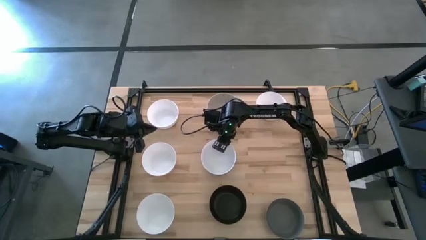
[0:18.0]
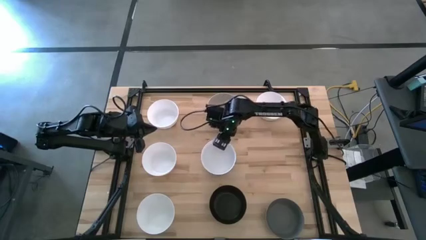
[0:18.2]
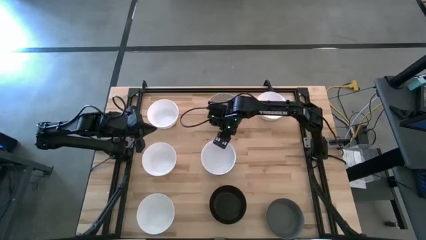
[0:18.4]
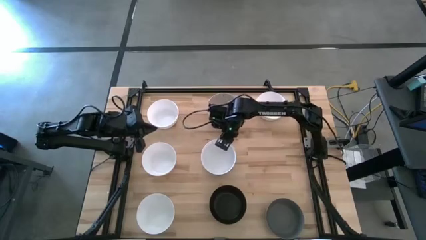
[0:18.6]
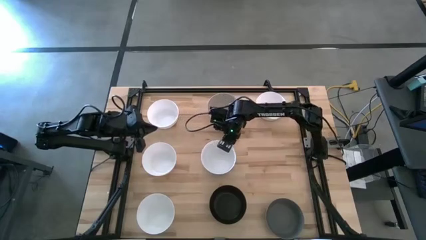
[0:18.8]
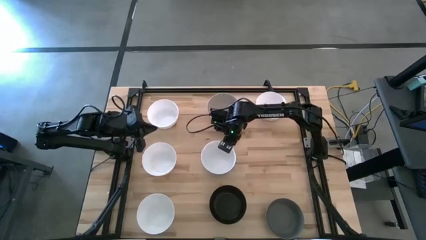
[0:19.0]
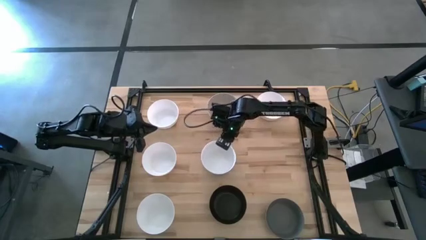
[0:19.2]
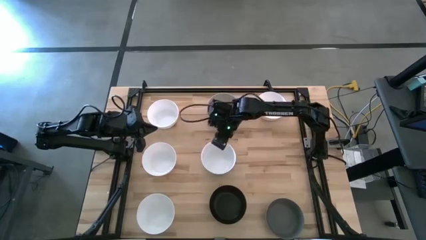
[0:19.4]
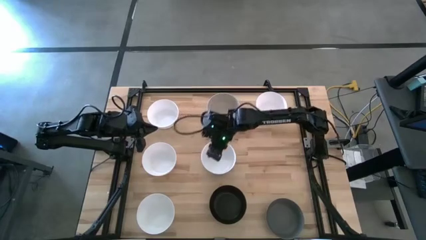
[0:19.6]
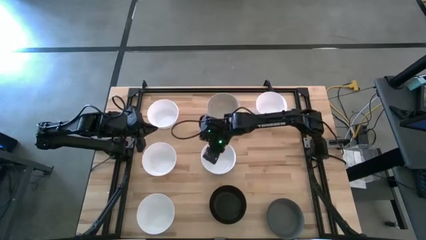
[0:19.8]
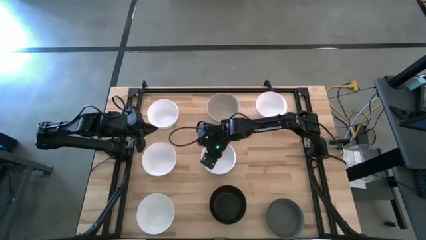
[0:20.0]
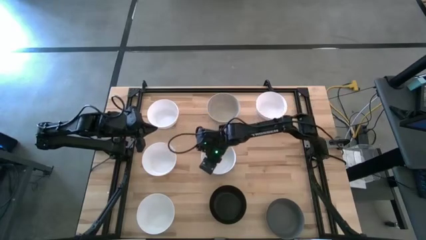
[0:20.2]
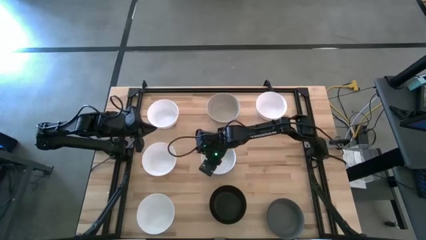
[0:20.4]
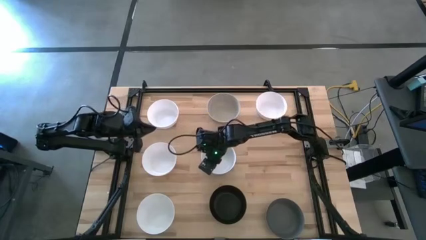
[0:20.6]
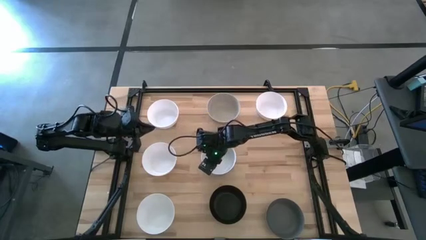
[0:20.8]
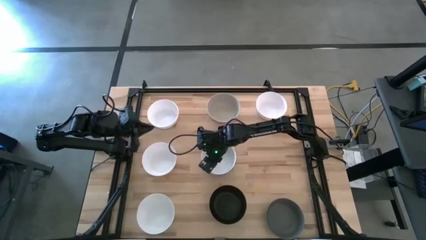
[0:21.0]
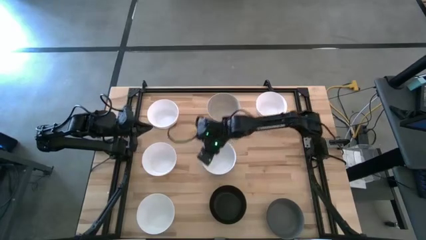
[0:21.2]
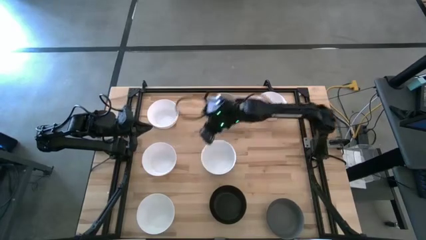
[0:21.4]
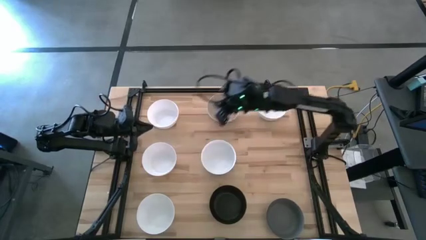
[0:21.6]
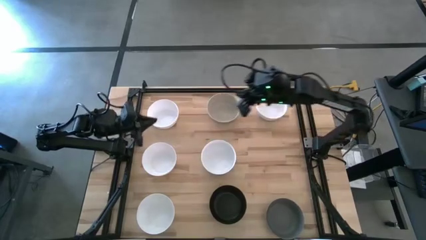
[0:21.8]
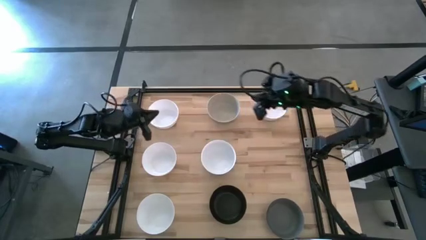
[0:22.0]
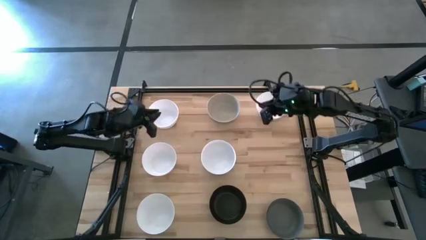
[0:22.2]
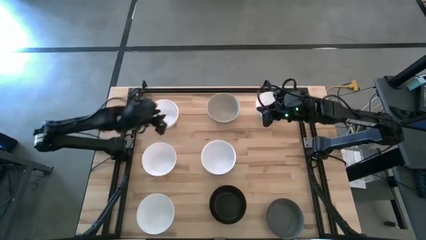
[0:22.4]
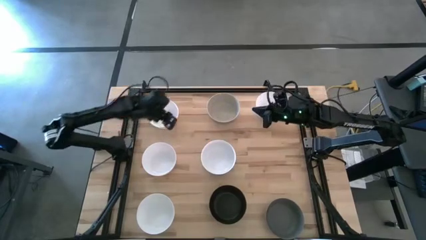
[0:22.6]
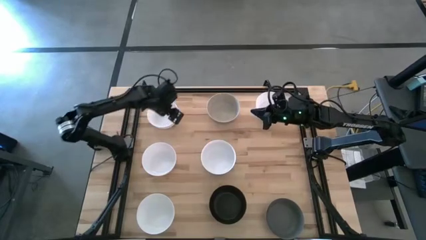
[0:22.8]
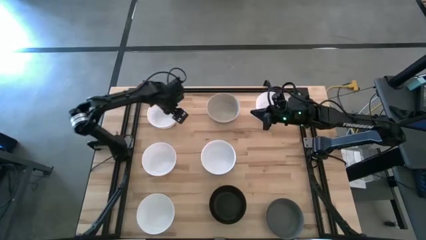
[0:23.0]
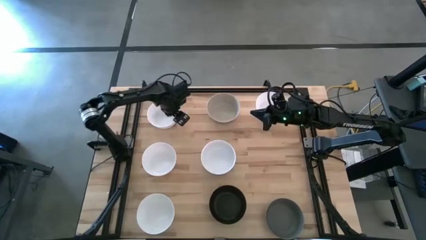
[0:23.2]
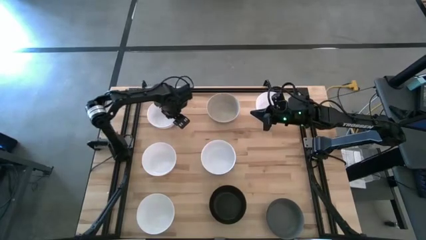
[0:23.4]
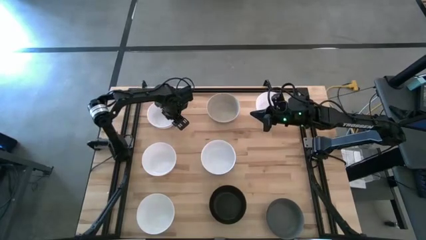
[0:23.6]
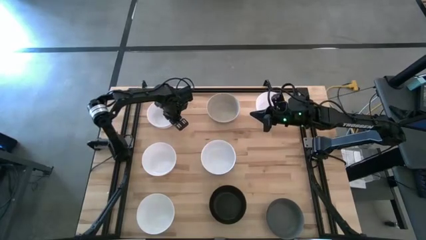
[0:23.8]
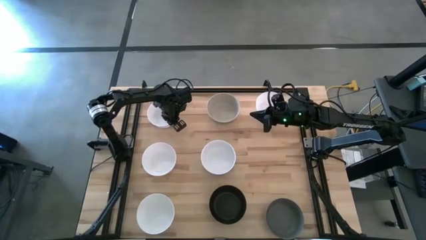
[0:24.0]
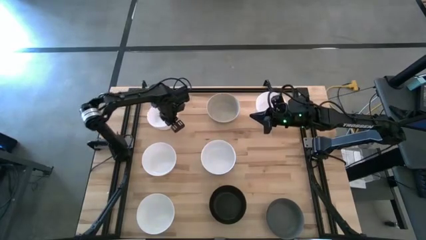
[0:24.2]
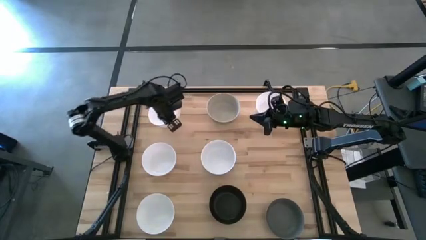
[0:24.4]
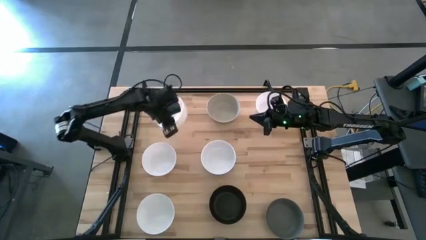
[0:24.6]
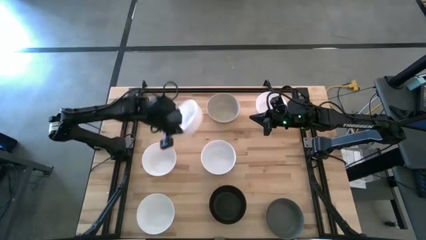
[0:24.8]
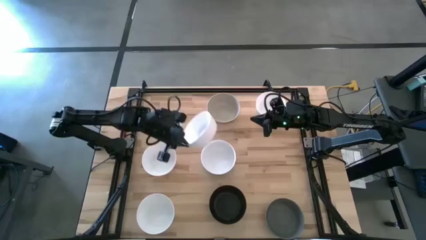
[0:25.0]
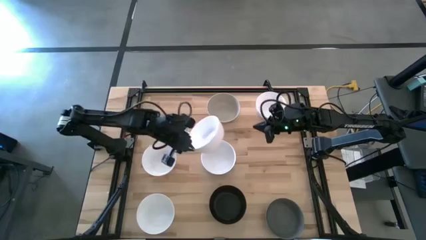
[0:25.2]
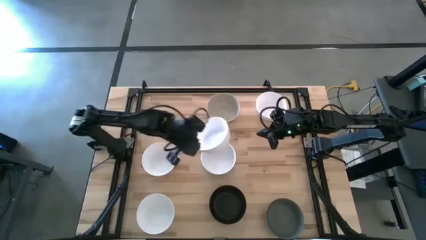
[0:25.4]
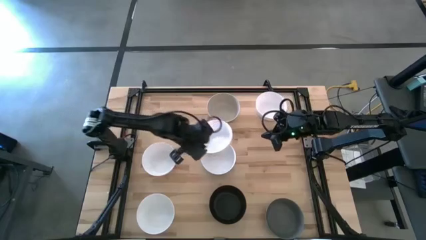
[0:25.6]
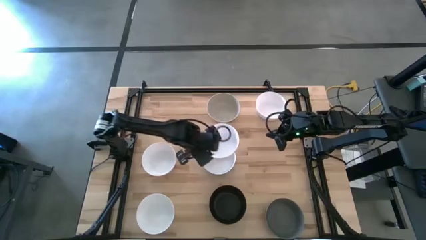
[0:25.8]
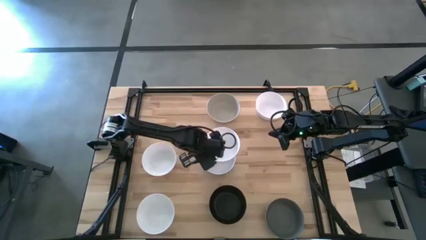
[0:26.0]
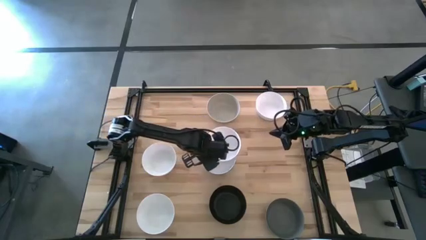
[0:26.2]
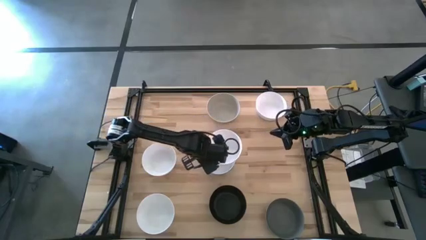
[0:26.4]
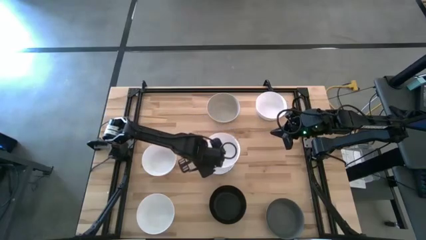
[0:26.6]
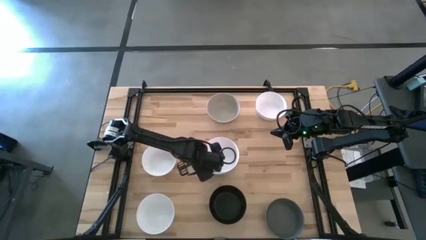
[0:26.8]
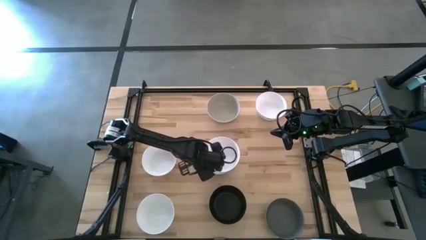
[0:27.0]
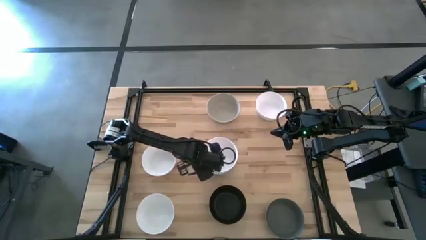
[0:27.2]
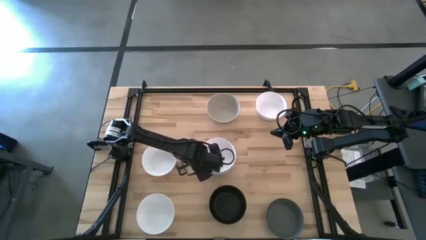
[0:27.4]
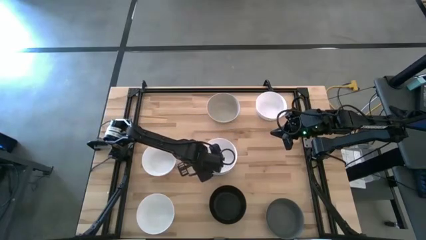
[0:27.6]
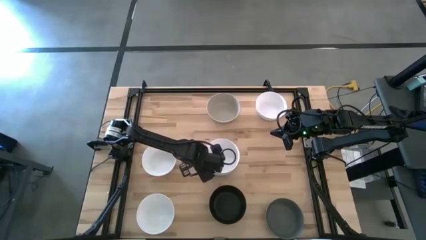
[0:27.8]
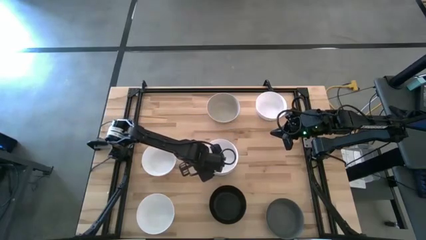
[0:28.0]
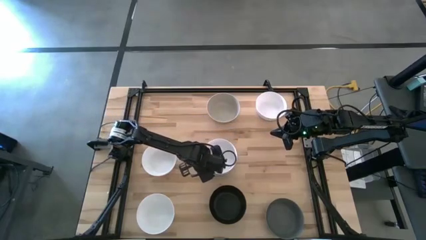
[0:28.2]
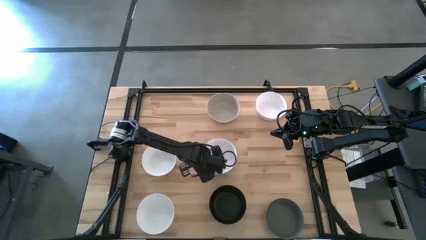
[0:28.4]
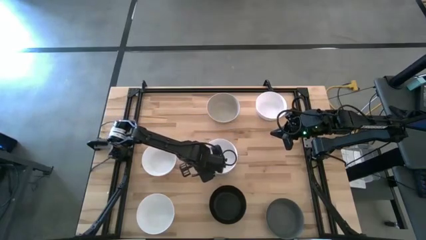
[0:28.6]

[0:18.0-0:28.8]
Task: Nest bowls inside each other
Stack the white bowl on the white bowl

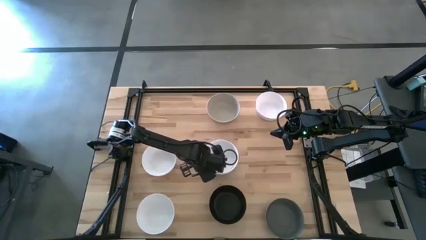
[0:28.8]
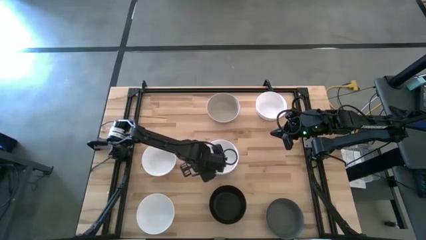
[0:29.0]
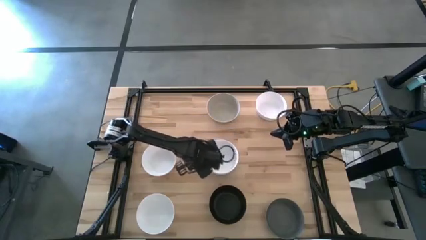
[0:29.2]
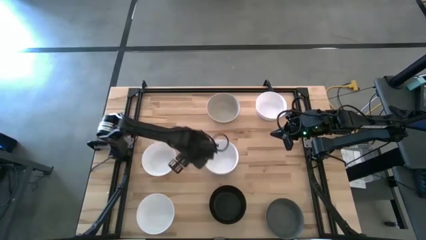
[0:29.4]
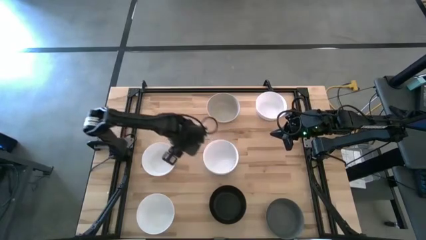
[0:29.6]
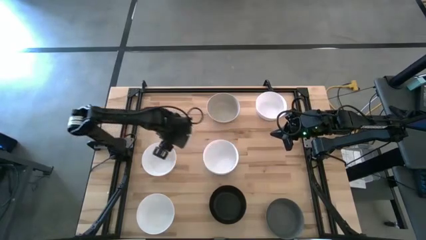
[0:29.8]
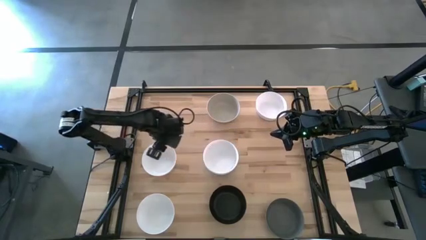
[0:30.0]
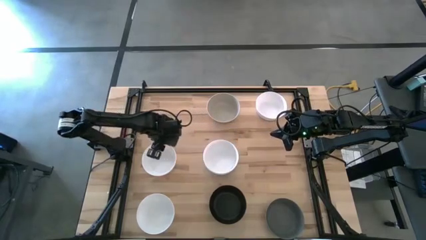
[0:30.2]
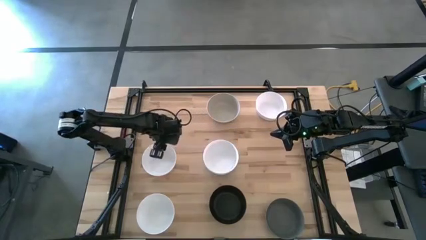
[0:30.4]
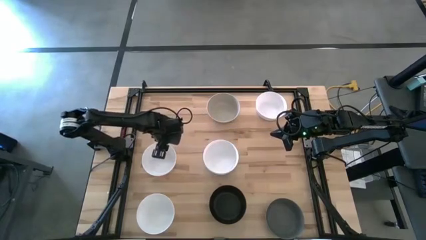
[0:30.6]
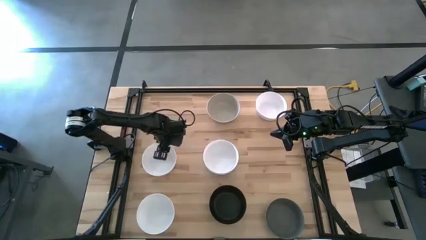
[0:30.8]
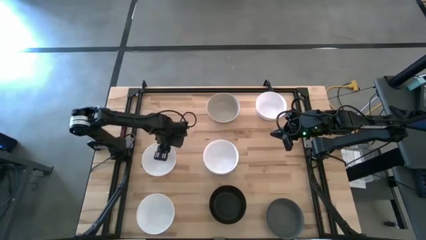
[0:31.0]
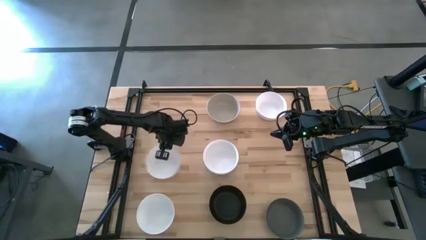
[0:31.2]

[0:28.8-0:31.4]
Stack the white bowl on the white bowl

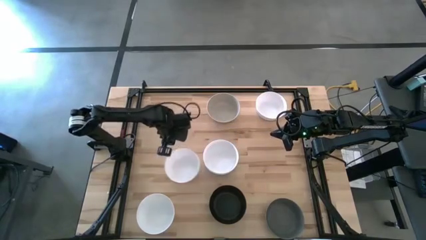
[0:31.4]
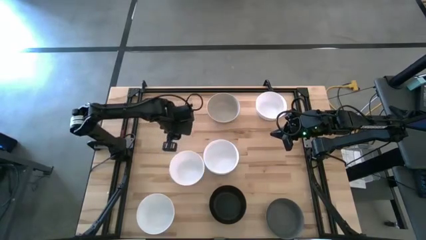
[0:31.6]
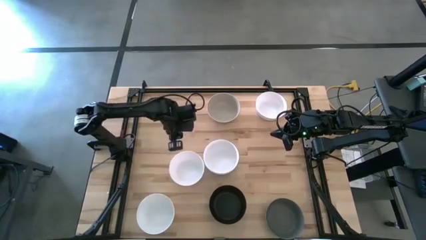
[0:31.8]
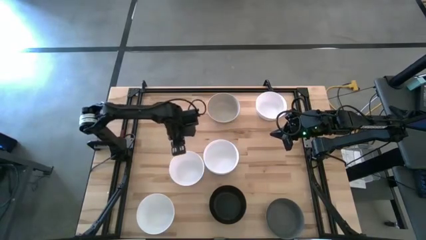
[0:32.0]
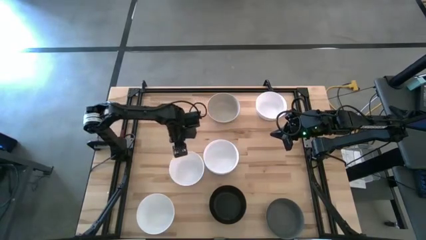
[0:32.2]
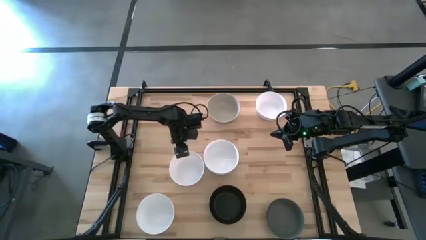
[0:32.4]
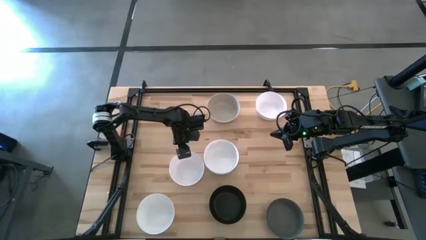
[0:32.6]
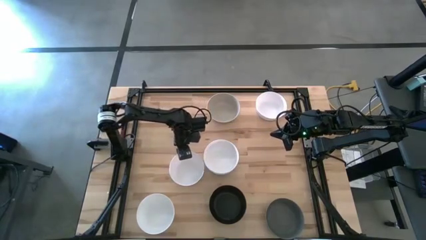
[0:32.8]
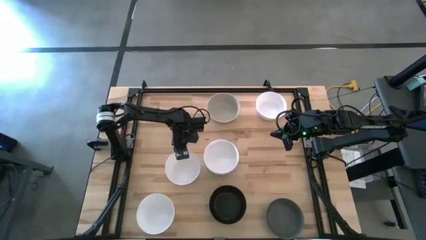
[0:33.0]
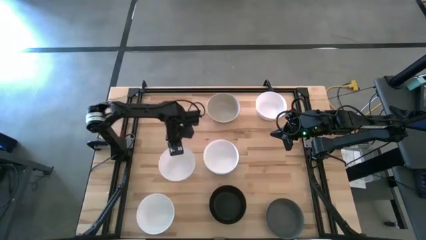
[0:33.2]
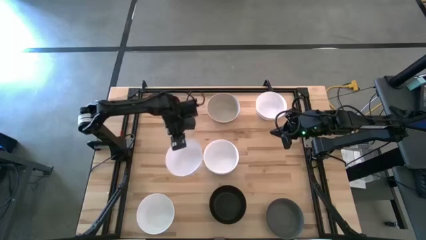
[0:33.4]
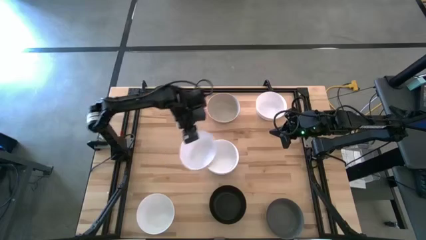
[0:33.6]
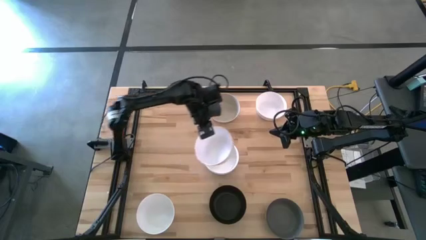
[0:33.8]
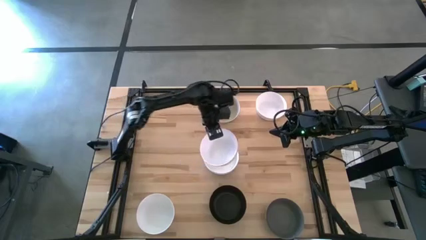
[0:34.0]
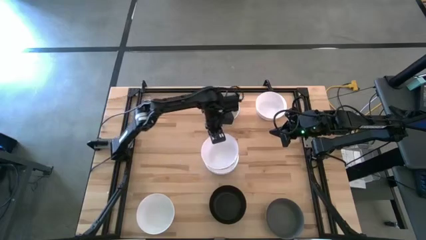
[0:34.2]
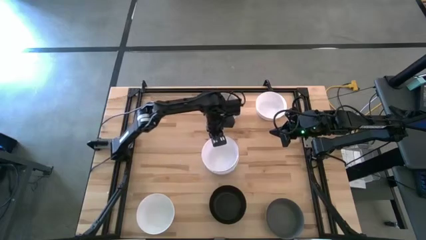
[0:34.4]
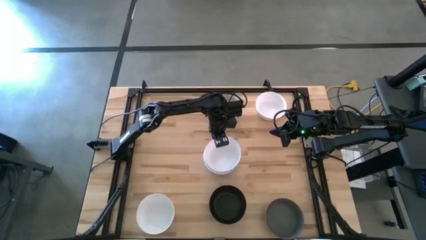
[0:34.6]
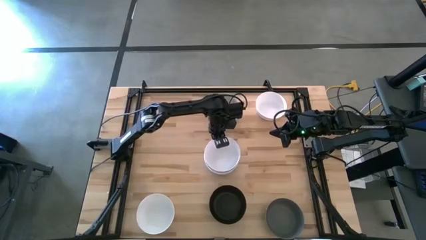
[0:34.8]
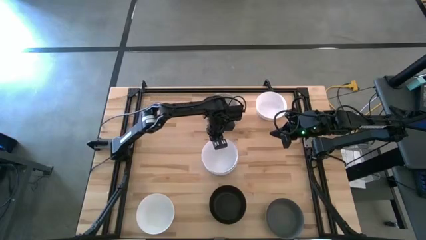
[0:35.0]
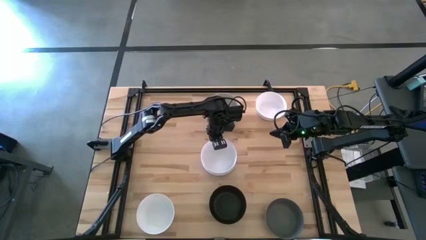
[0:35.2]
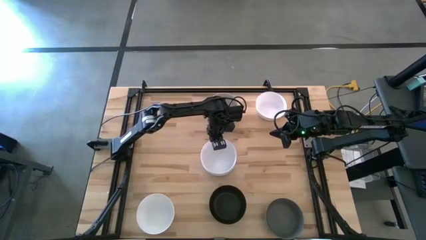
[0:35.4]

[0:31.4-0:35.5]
Stack the white bowl on the white bowl
